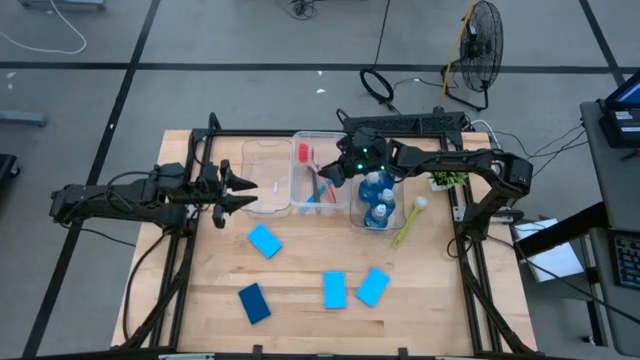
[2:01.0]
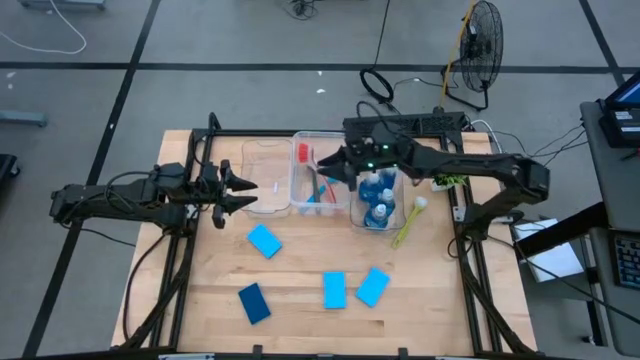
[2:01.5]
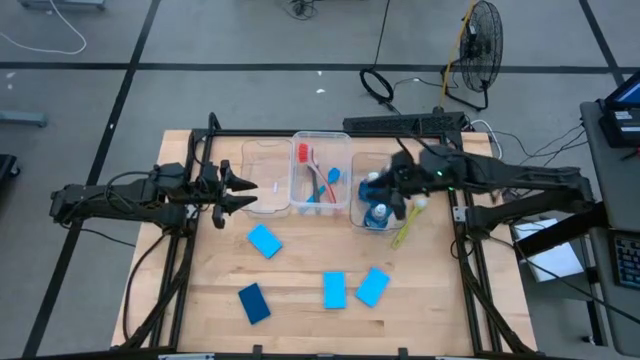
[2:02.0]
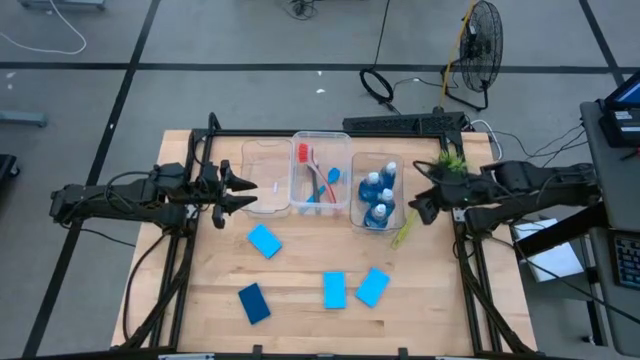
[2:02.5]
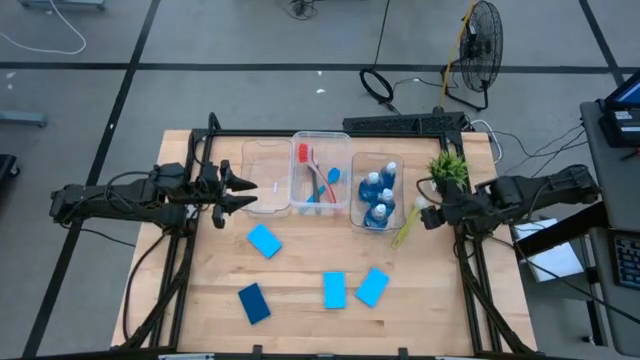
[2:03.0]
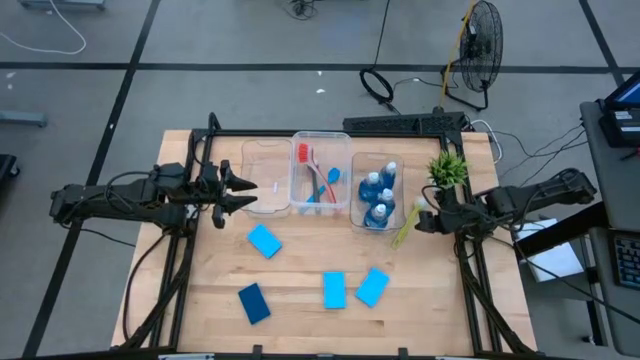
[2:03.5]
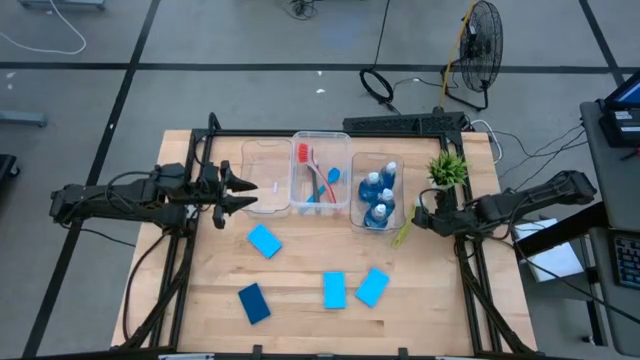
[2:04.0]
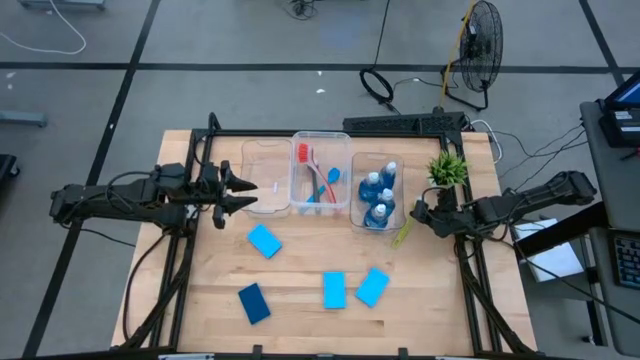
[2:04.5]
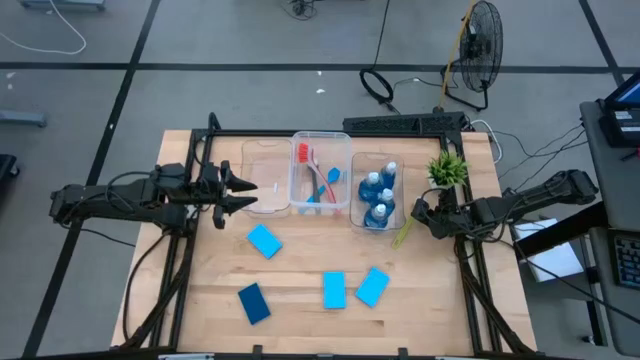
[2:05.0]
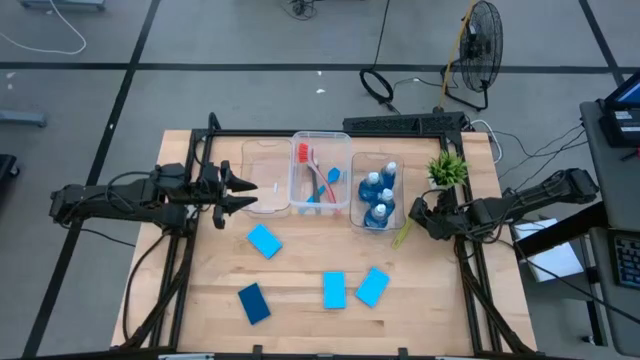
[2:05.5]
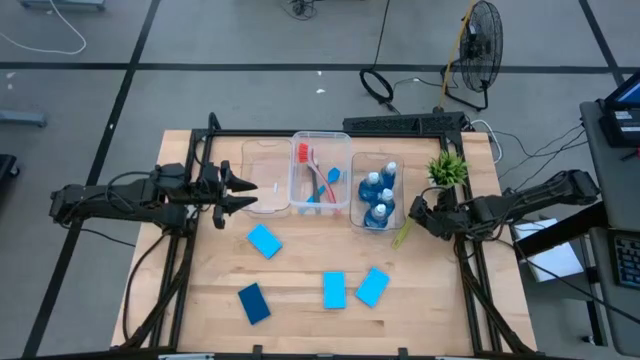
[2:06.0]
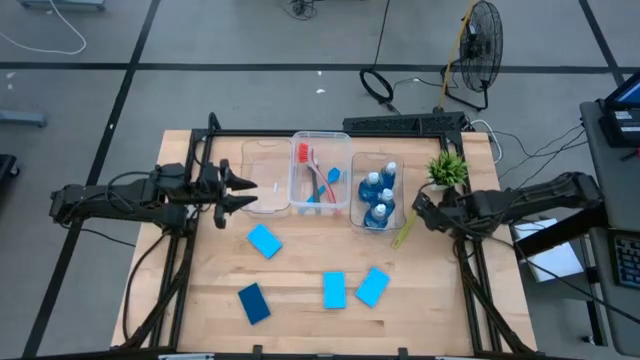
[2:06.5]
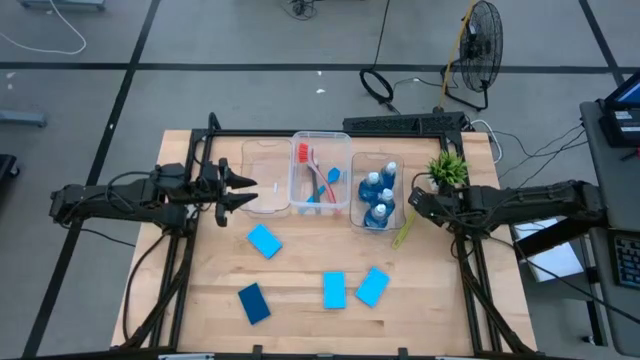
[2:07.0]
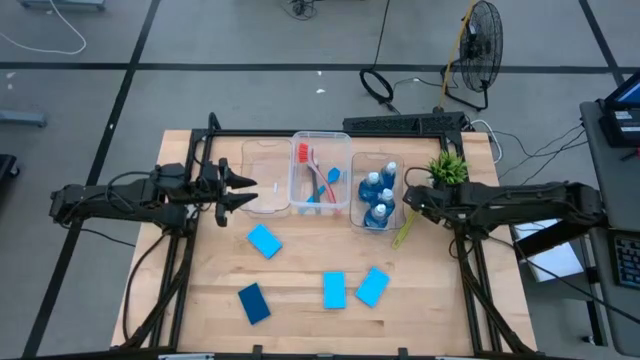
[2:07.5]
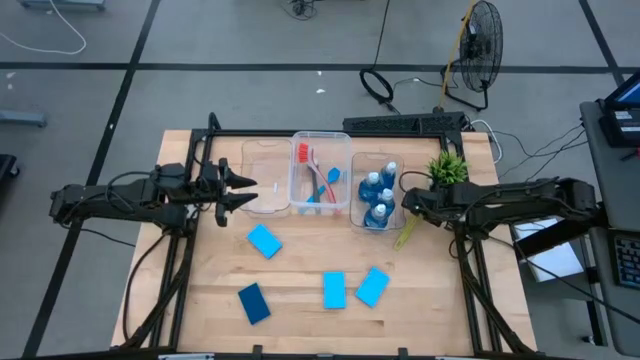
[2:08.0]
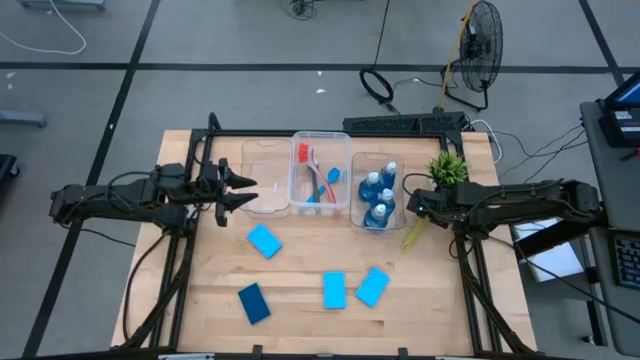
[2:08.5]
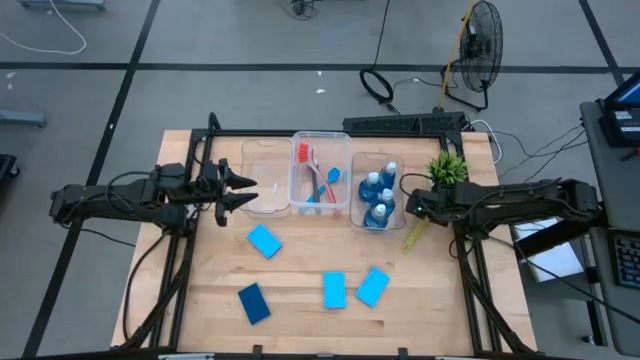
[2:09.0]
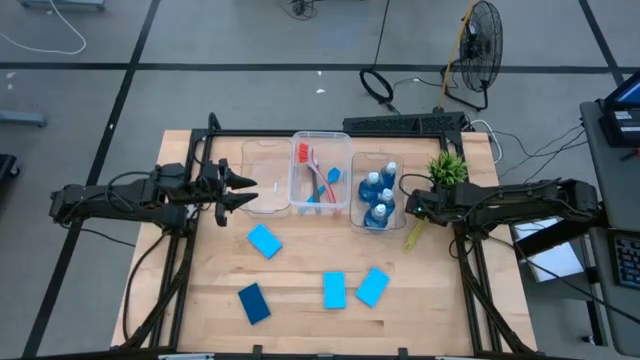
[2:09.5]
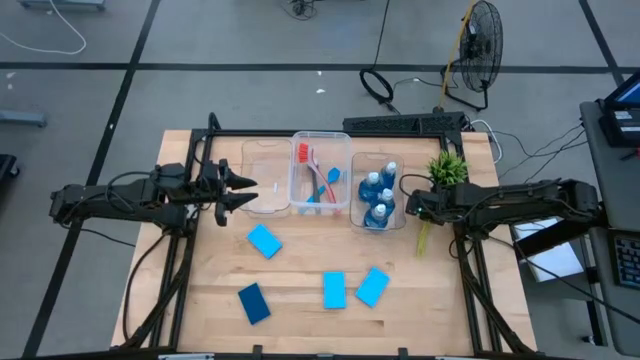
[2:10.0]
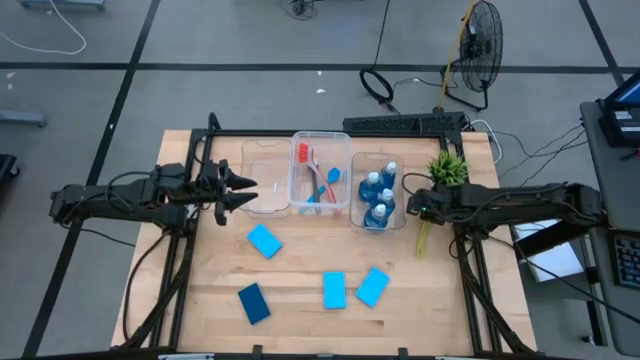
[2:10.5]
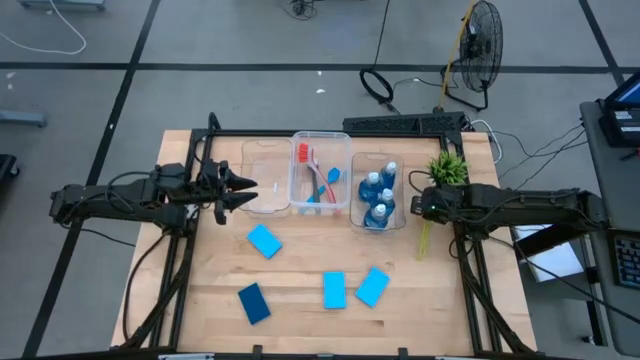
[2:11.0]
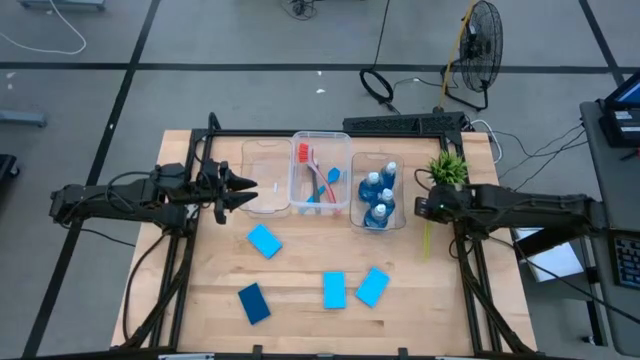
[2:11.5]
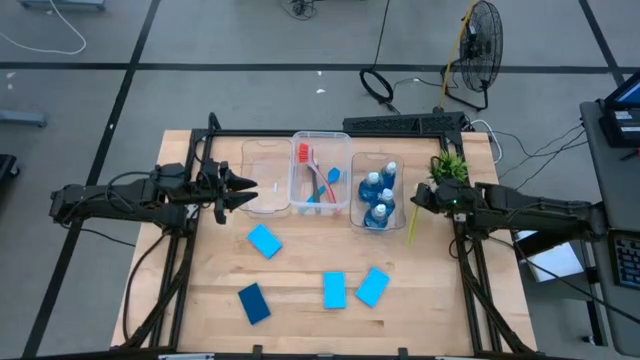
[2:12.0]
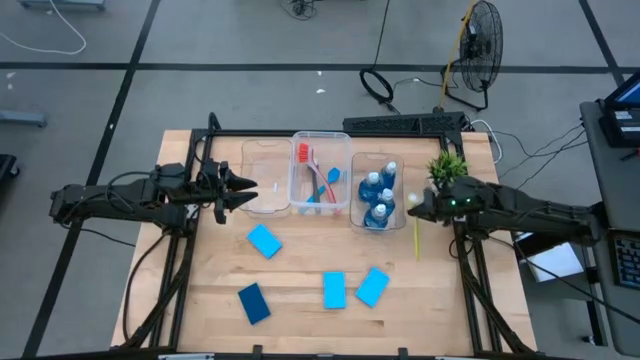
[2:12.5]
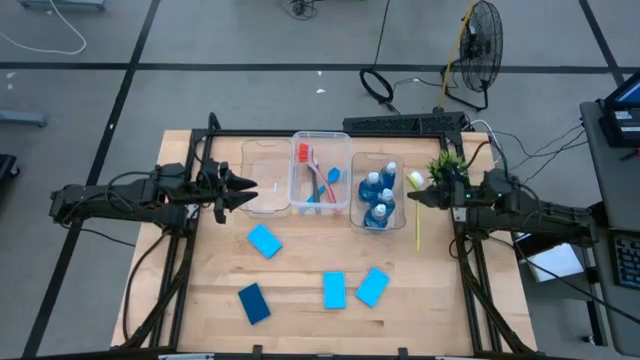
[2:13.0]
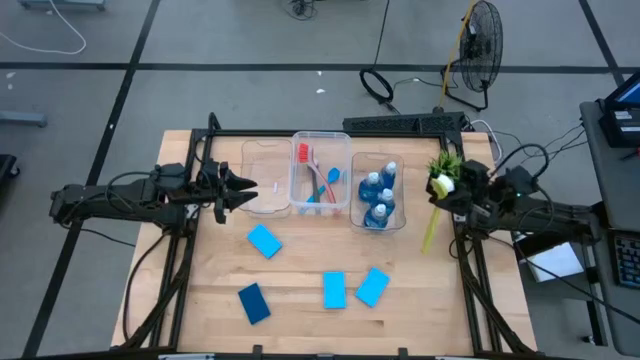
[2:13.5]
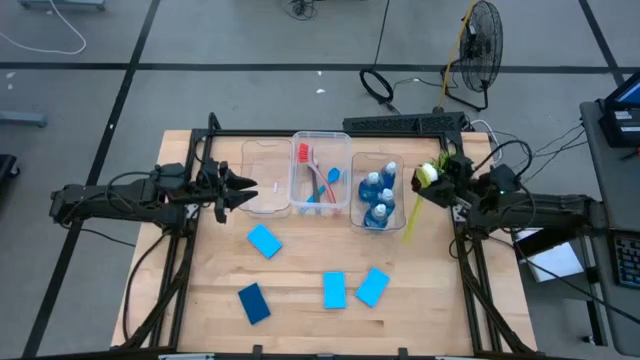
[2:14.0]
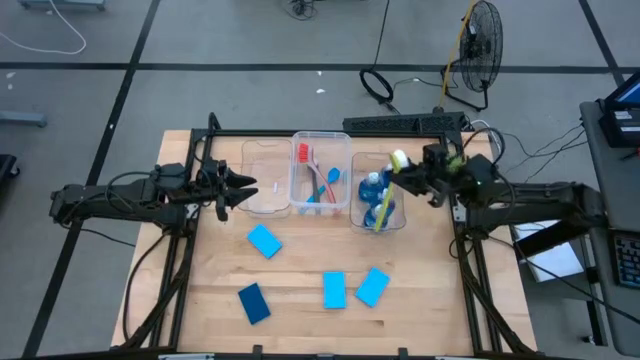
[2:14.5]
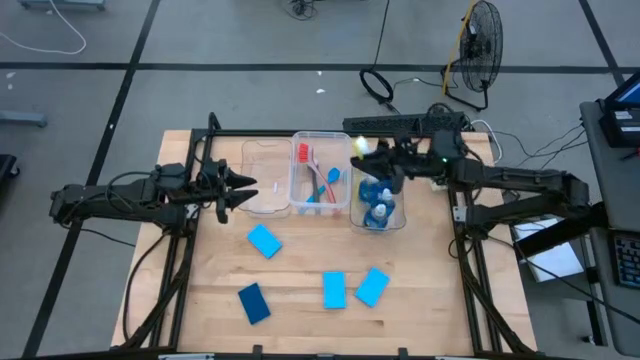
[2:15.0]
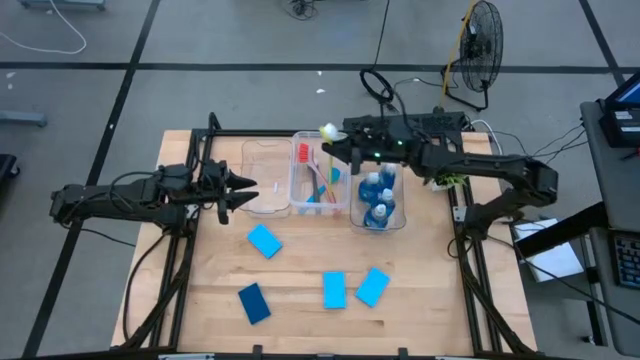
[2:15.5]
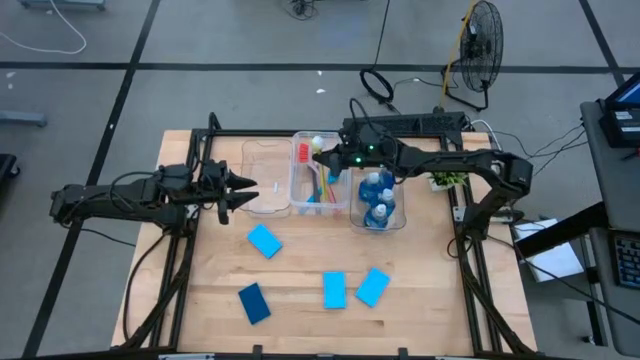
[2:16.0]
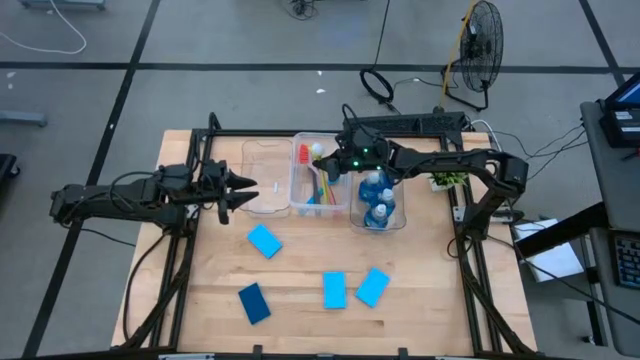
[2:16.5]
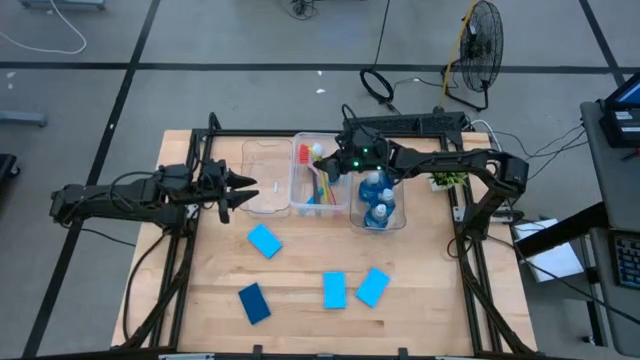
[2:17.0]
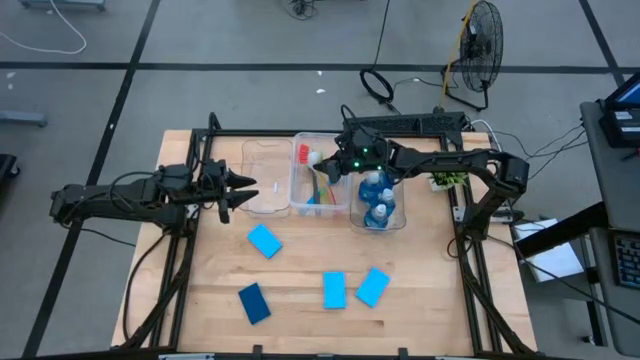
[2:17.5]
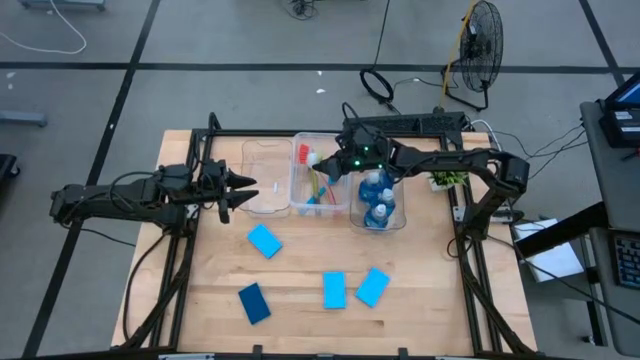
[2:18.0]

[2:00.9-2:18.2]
Task: Pick & Place Kitchen Sink Supplies
Put the green dish brush into the white transparent bin

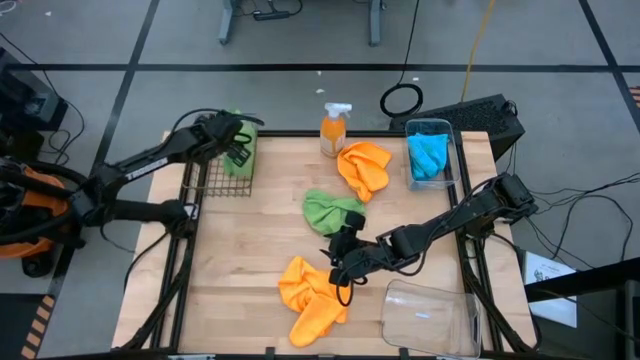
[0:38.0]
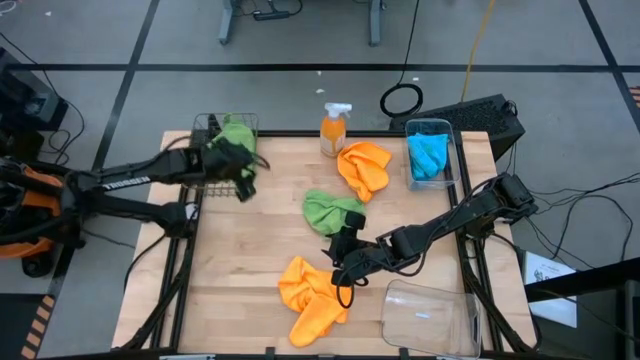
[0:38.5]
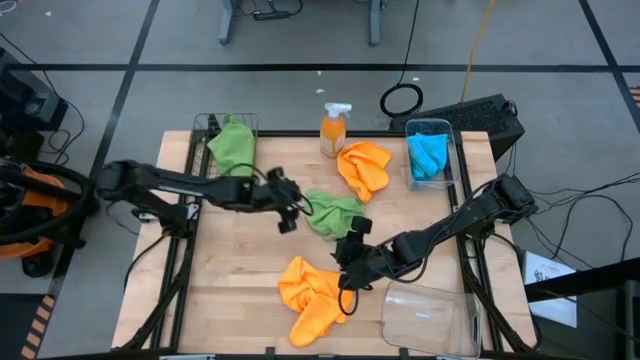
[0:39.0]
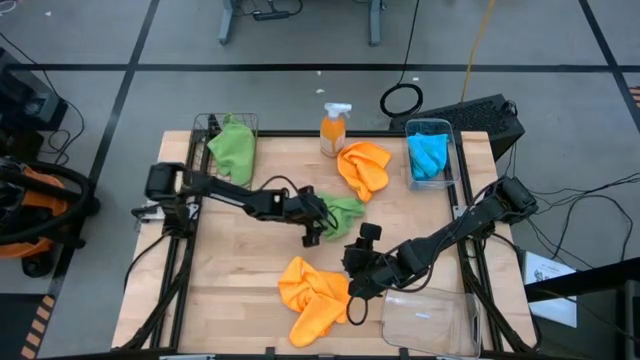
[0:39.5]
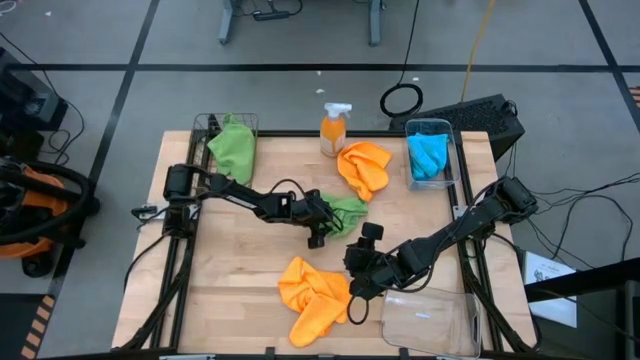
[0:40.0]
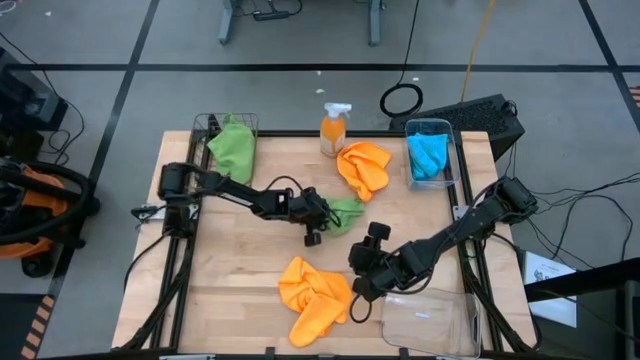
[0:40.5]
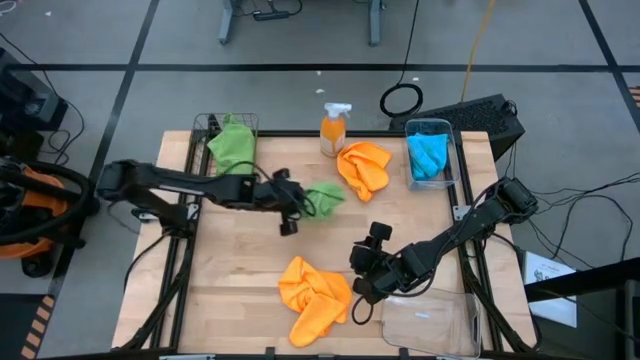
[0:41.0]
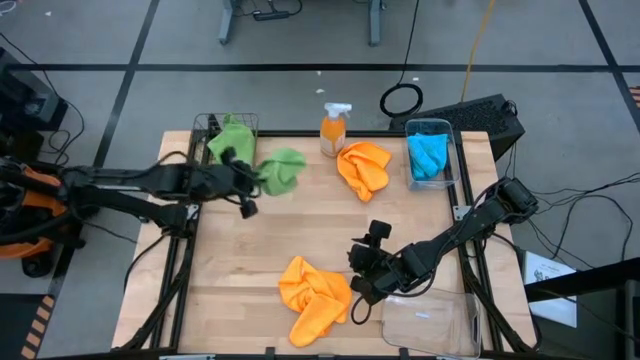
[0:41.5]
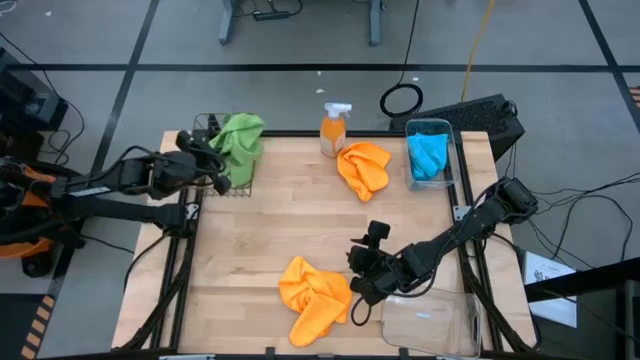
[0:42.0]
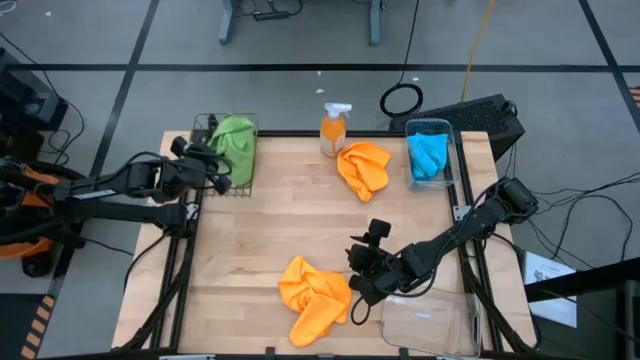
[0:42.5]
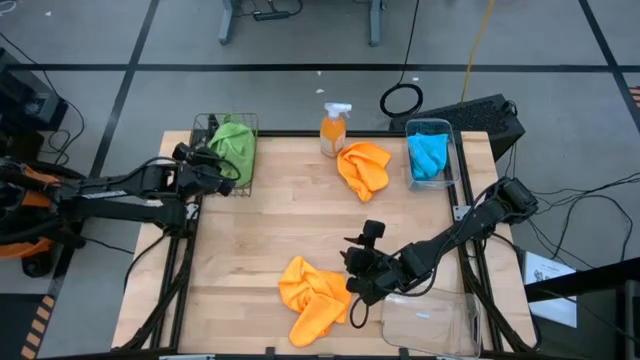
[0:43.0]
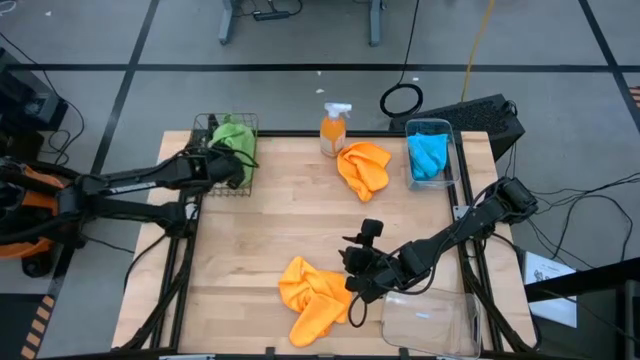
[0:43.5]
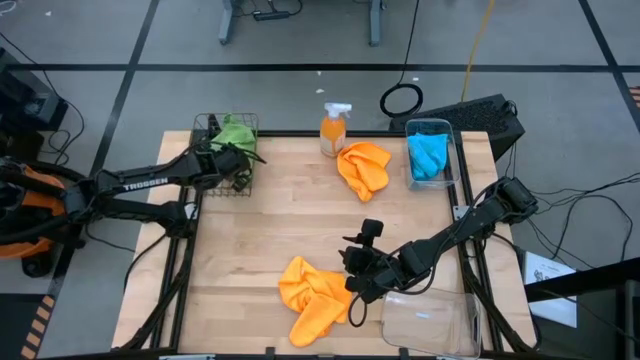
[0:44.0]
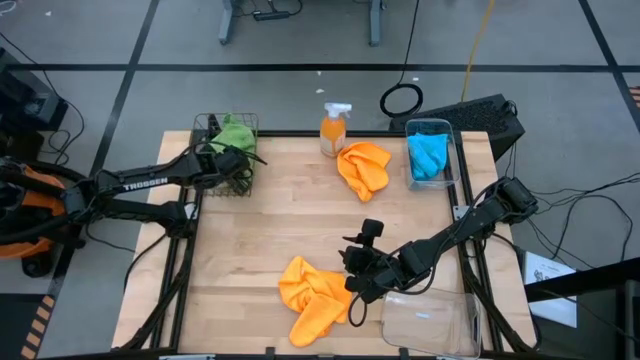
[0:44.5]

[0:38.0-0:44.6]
Task: Sort microfiber towel by color & place in baskets
Put the green microfiber towel into the wire basket
